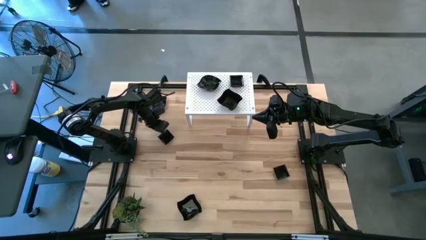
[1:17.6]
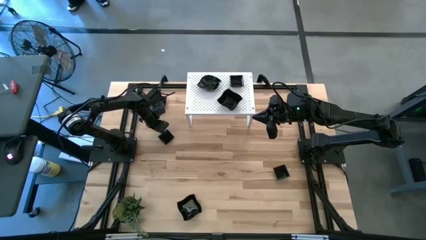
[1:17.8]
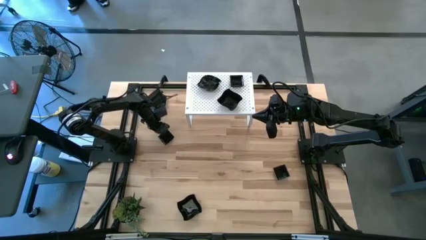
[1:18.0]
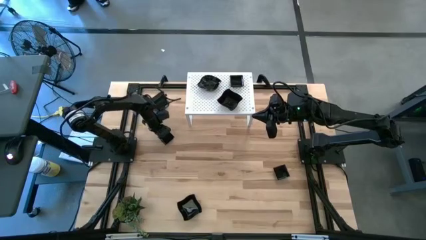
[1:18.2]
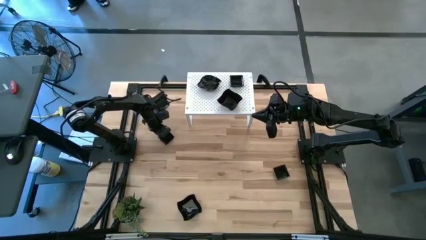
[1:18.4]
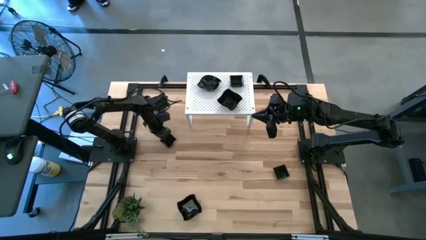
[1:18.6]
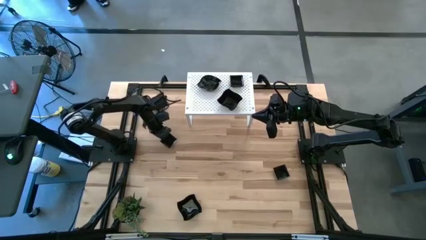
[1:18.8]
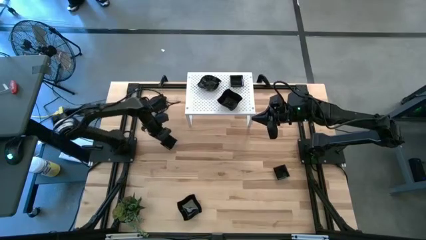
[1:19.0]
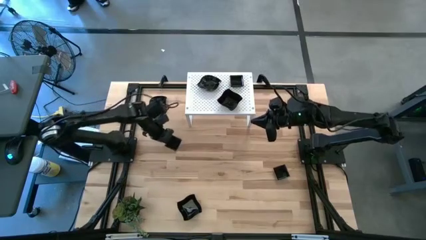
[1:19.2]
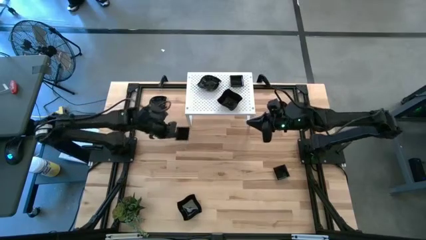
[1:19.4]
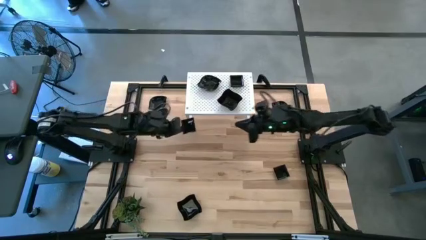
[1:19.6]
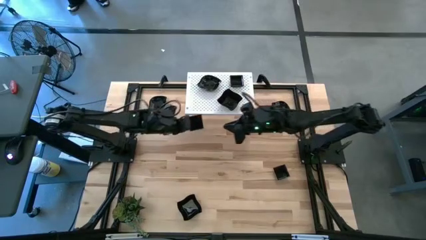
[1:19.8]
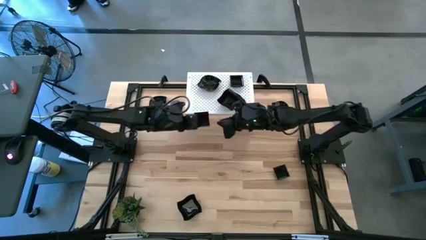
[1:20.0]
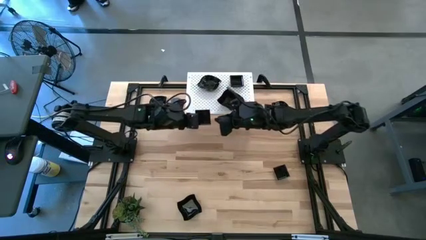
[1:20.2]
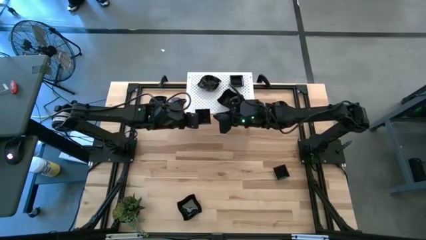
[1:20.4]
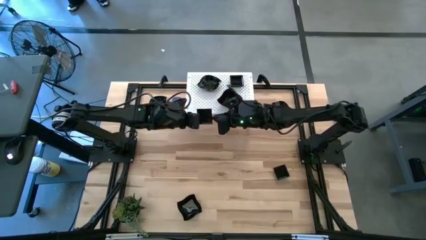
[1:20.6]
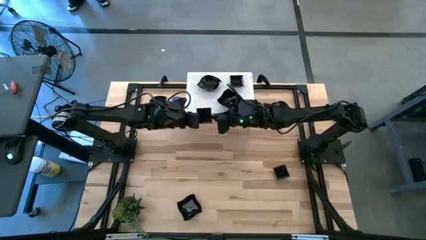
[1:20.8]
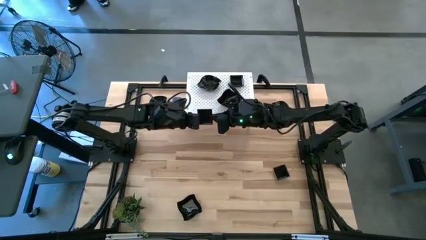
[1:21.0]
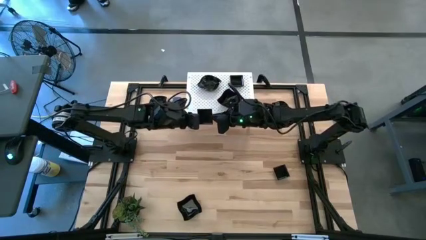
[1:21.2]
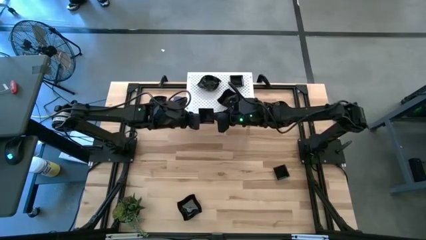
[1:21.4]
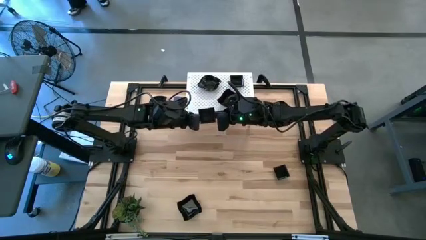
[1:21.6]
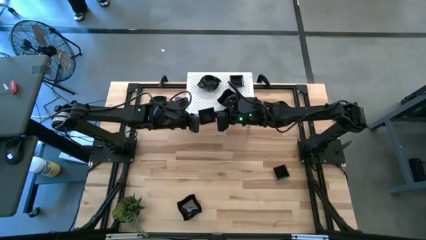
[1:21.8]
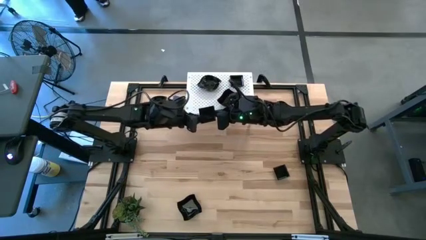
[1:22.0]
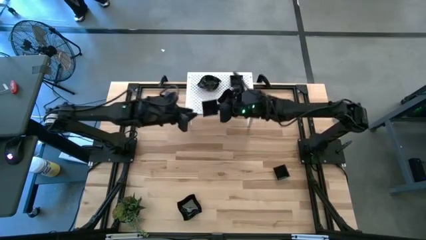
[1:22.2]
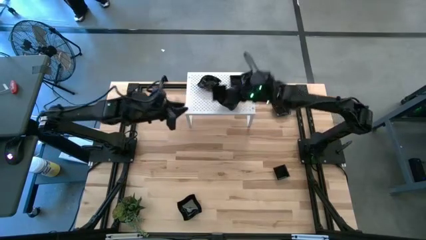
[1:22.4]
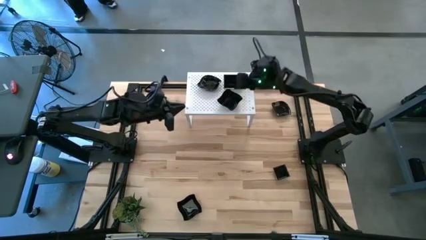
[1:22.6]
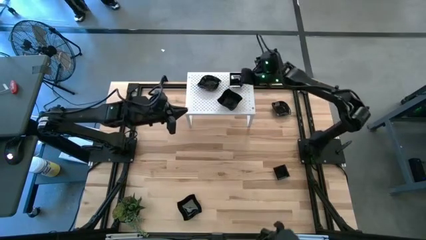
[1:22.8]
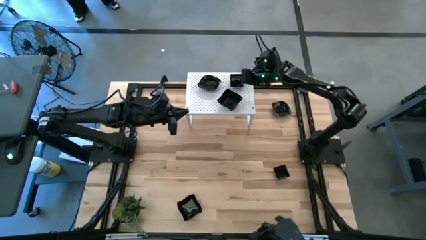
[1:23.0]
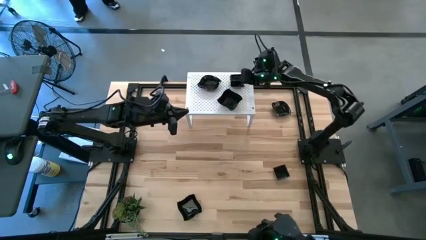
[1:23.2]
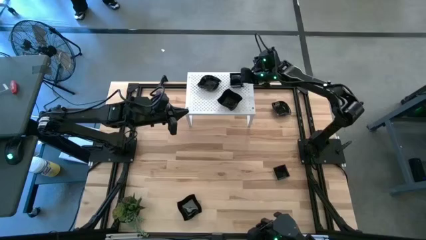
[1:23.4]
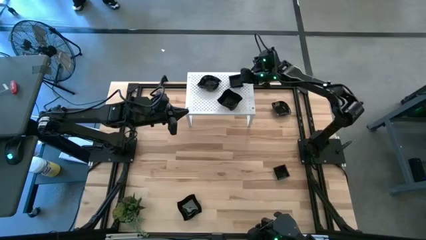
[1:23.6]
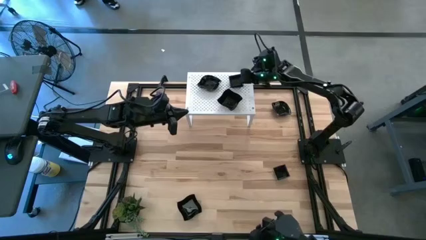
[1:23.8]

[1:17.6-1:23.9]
Task: Pick & Place Mini shaped plates
Stack the square plate on top of the stacked square plate on the shelf

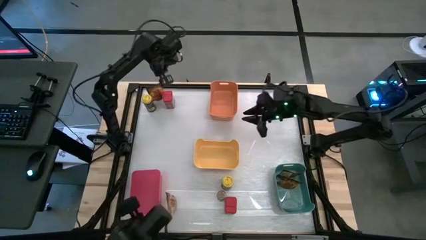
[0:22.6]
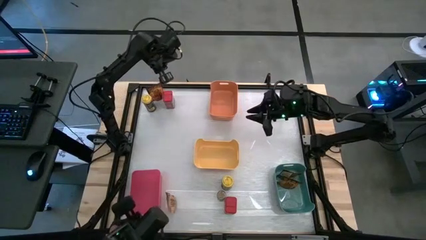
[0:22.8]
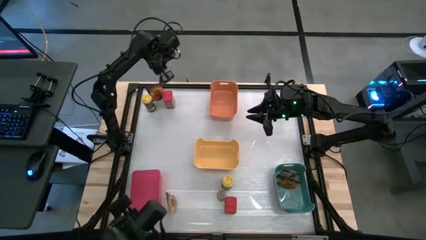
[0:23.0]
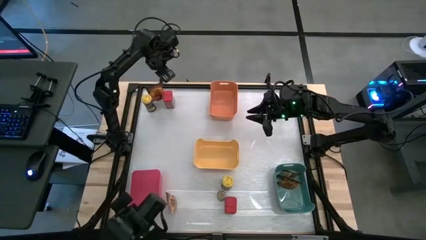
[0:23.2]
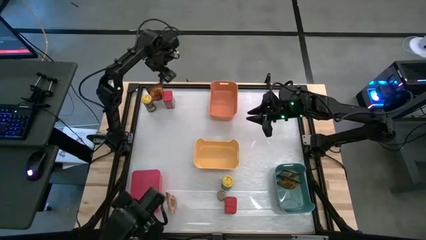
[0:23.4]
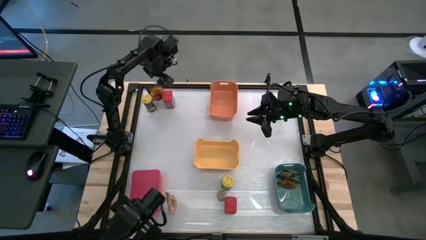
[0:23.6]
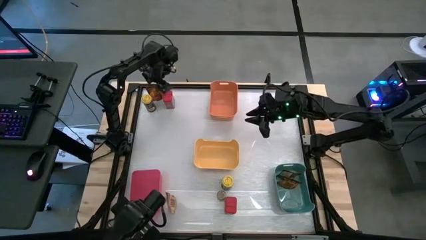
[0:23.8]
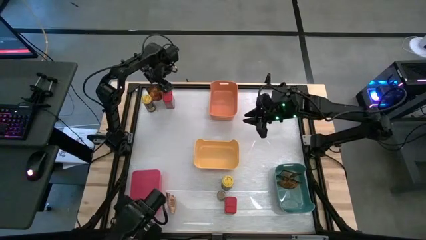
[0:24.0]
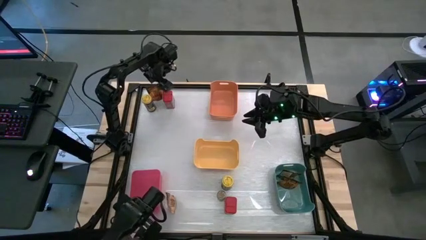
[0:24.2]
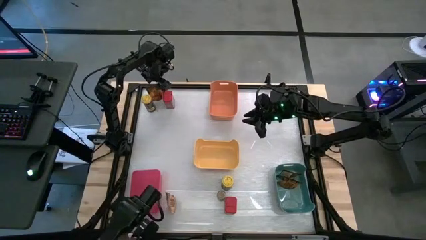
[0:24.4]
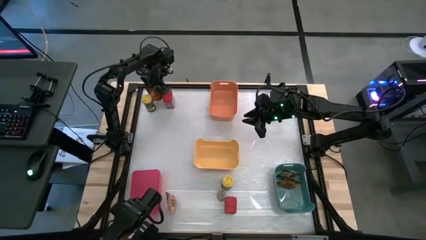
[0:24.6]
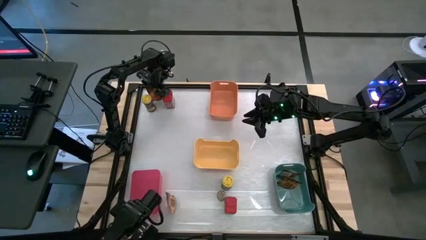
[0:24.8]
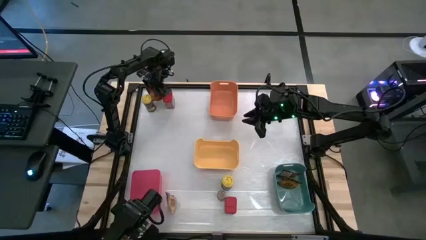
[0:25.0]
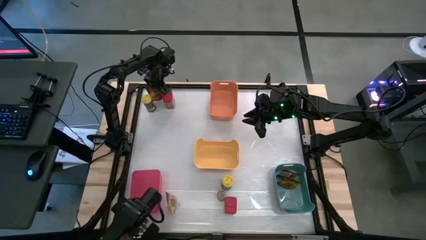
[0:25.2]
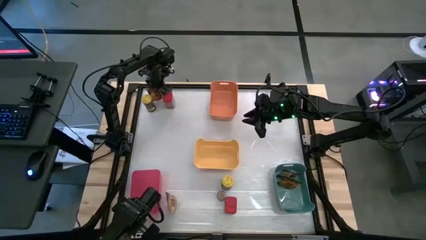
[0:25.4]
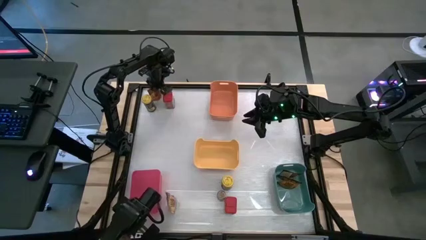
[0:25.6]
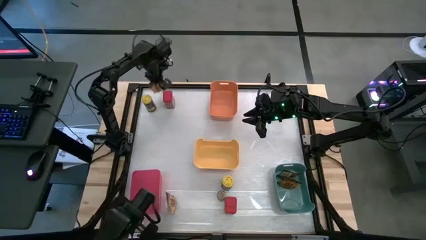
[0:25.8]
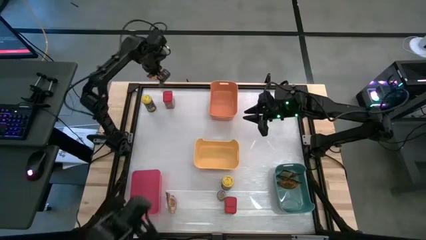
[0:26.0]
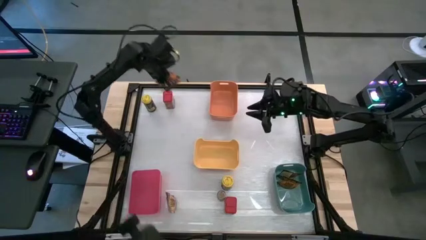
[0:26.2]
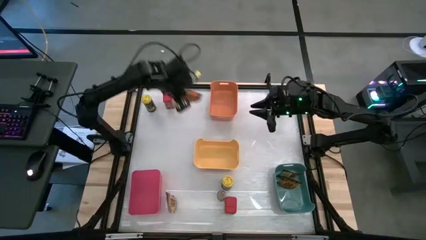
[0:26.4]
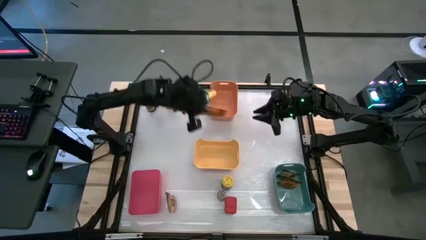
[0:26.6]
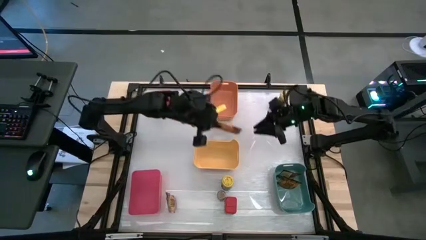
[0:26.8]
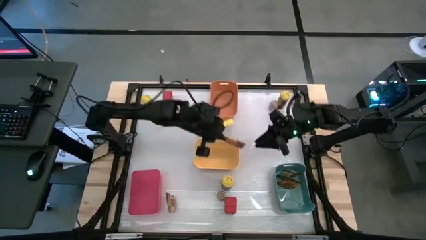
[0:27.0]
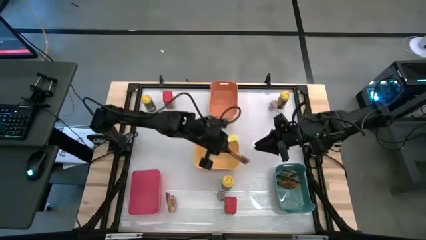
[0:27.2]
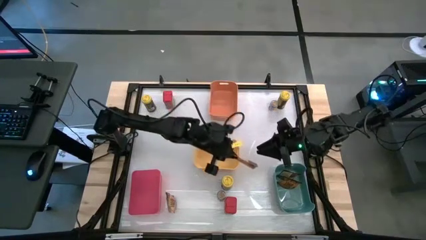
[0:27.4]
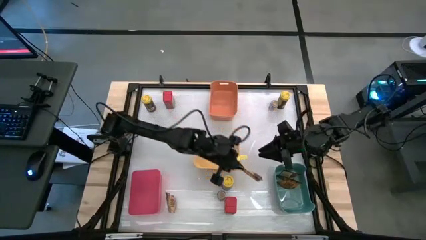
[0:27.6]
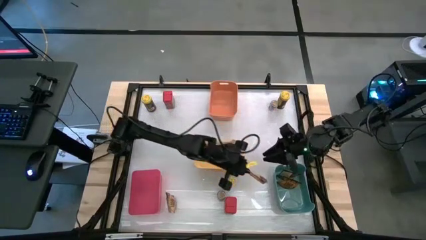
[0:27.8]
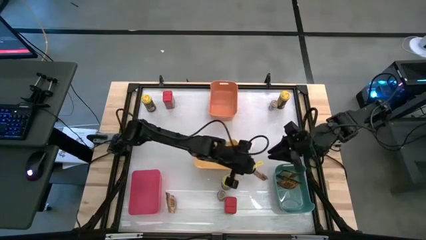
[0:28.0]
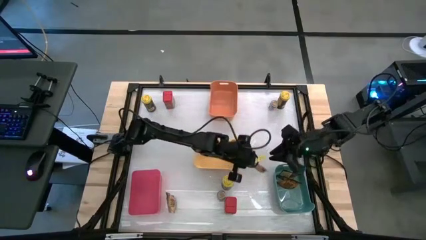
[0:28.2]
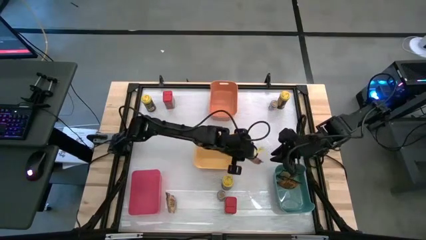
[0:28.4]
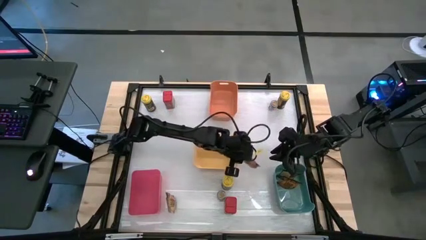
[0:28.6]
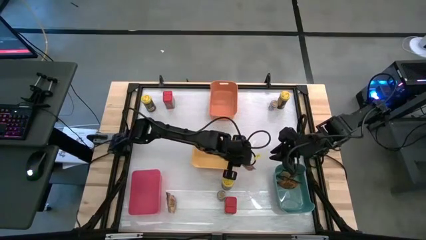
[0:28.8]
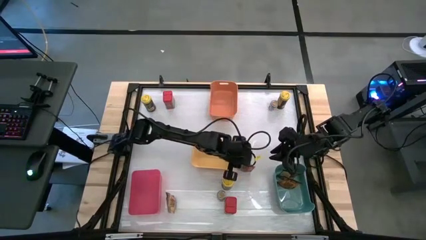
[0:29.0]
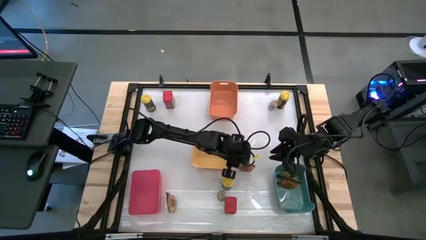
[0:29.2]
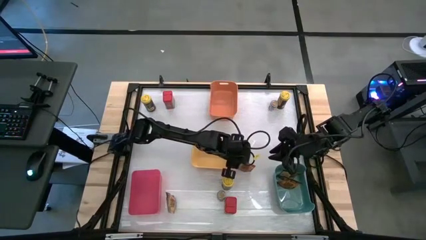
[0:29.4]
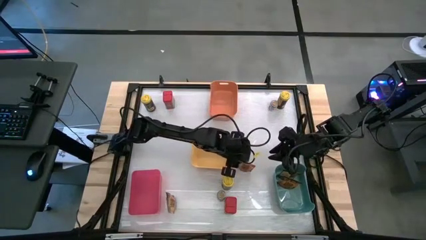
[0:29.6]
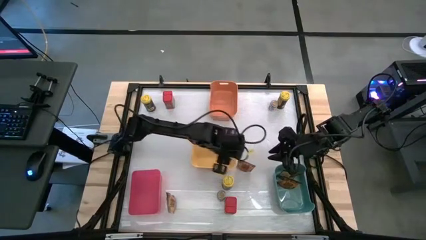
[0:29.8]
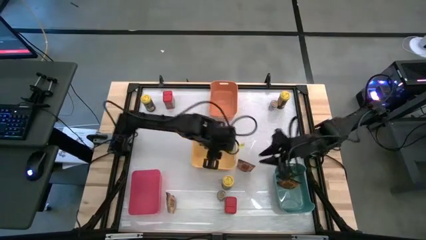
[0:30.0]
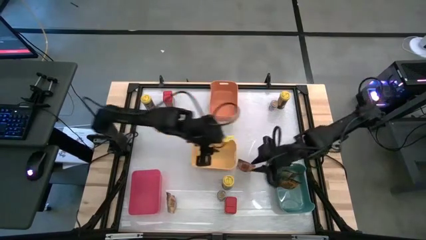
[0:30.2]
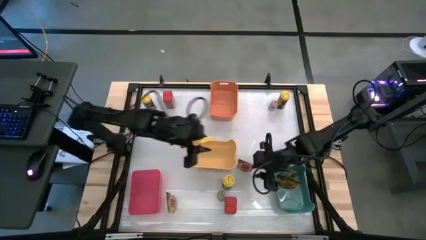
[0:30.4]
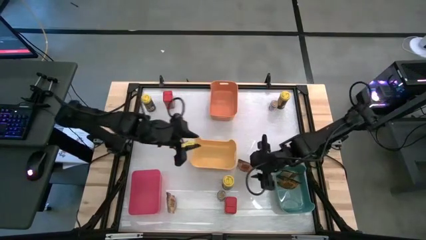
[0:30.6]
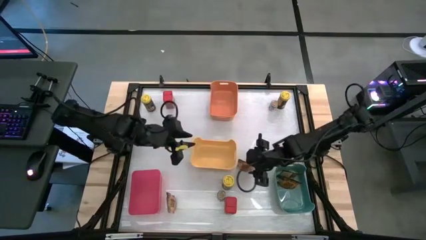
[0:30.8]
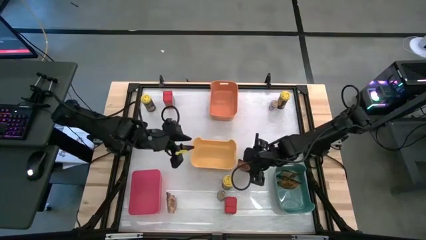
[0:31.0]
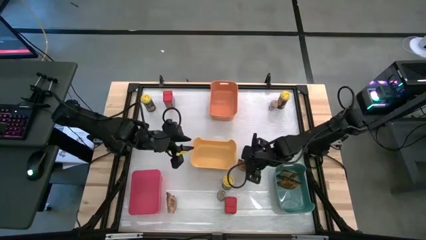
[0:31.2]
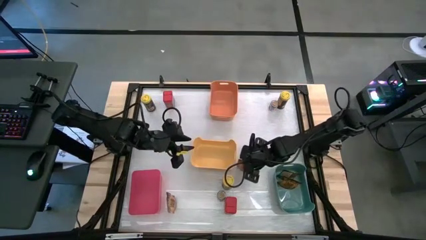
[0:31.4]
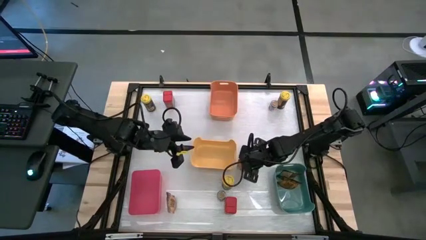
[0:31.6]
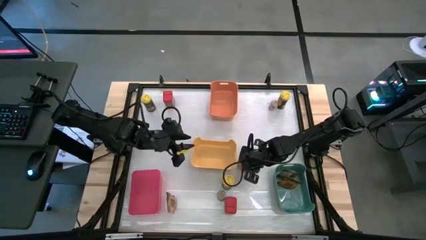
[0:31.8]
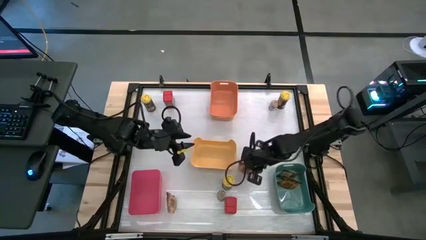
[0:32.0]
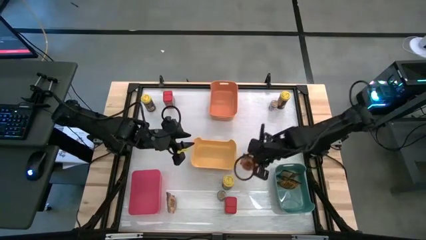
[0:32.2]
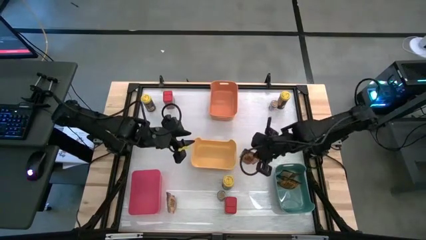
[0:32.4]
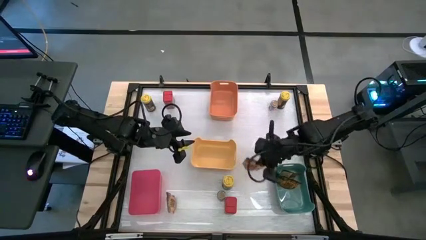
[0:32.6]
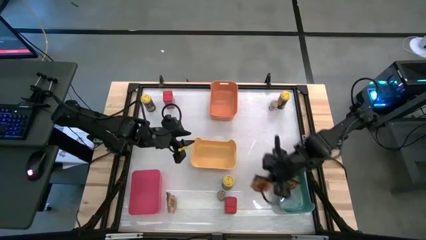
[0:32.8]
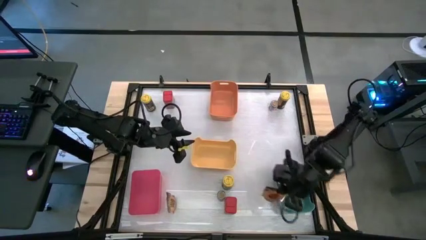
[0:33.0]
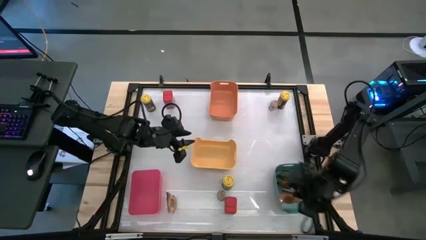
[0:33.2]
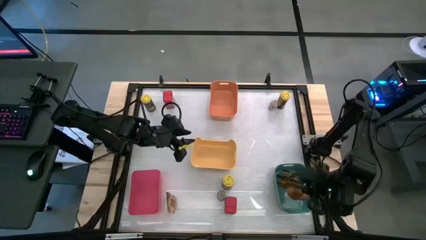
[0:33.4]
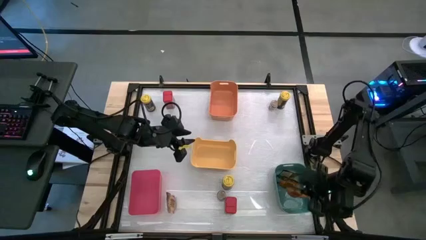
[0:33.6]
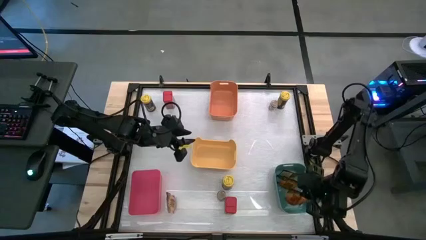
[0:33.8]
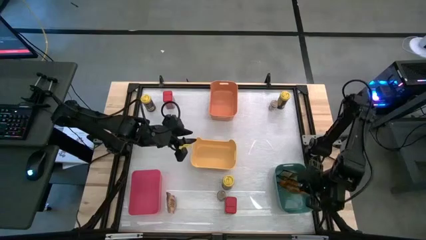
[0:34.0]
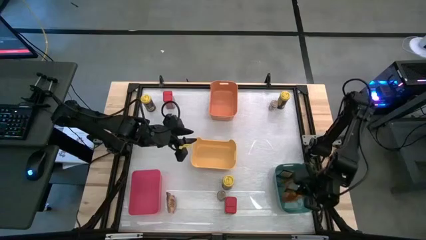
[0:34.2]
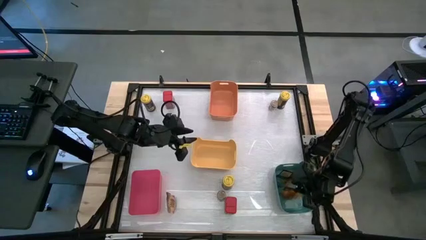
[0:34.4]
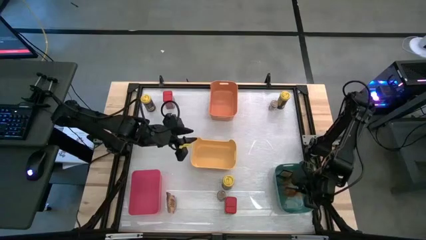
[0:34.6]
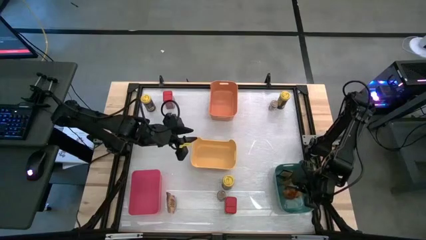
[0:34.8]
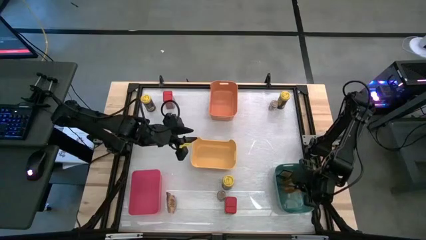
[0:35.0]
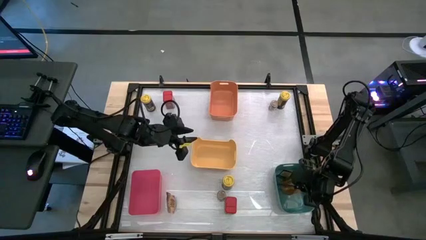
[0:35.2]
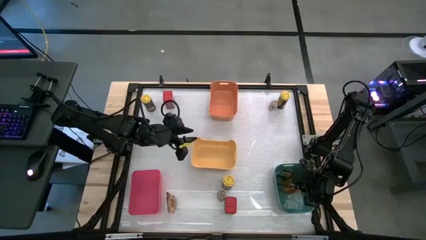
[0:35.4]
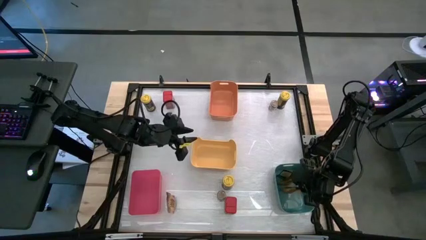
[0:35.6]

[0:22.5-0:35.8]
Task: Sort spices by type
Put the top orange seasoning bag into the blue bin
